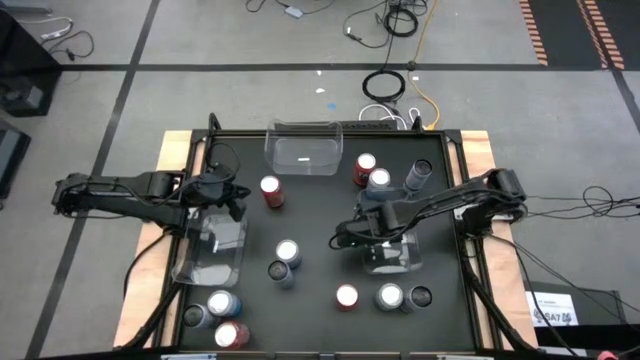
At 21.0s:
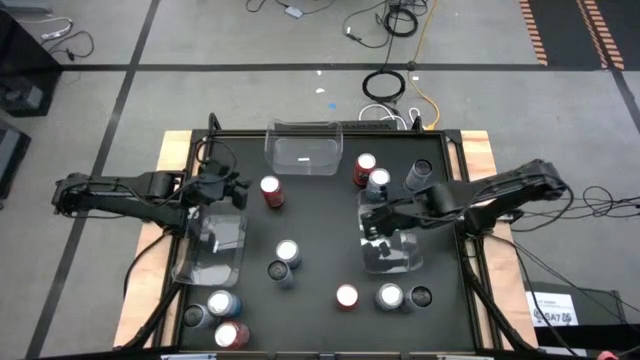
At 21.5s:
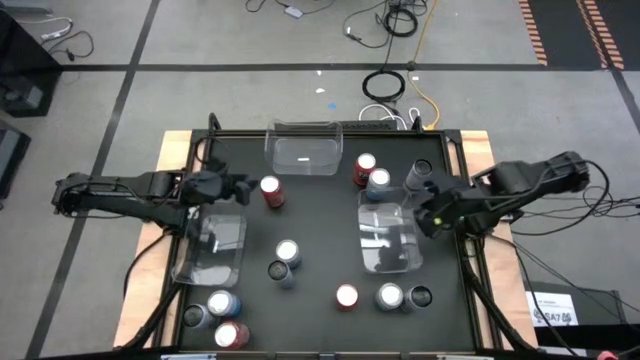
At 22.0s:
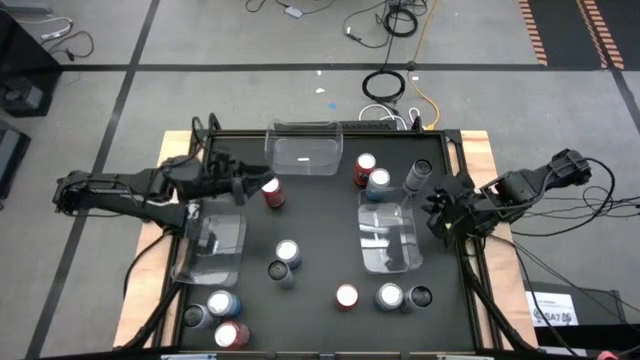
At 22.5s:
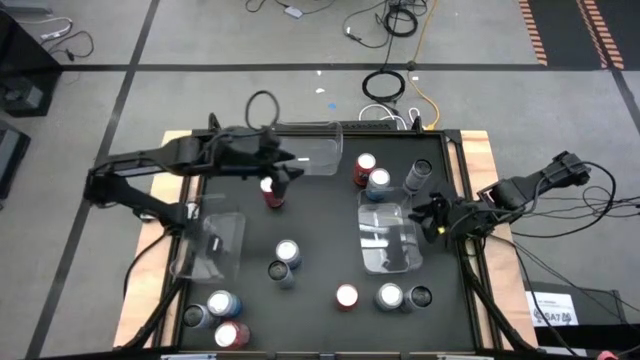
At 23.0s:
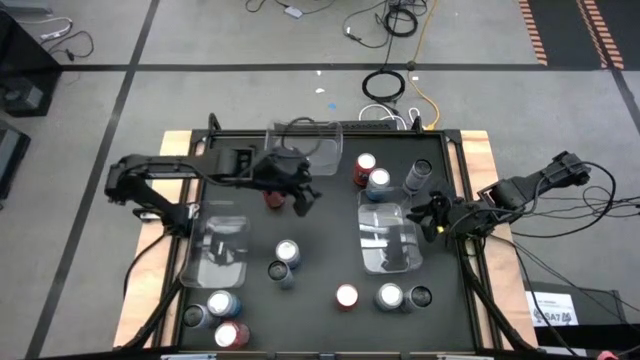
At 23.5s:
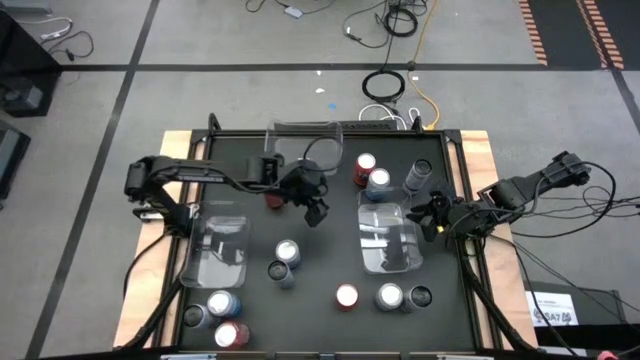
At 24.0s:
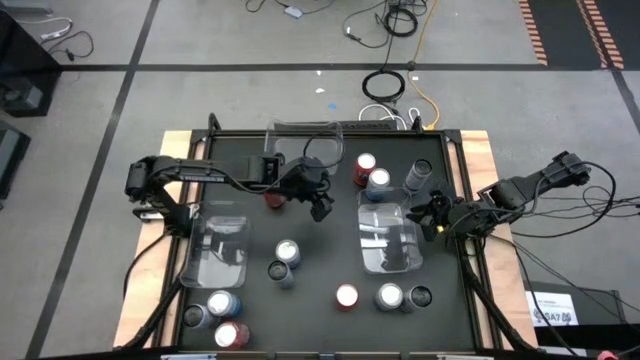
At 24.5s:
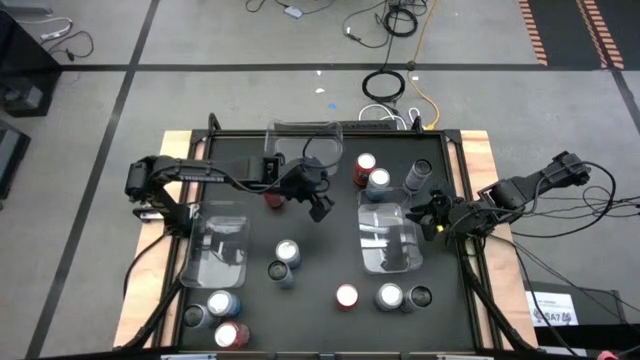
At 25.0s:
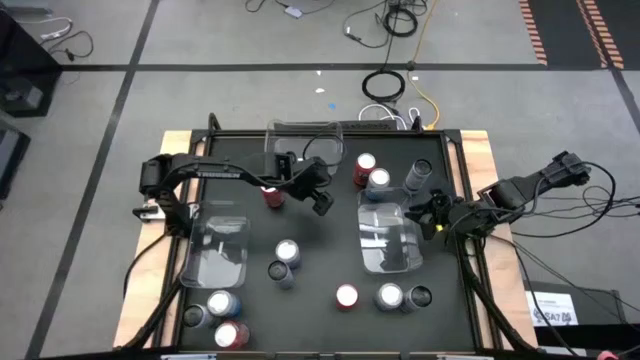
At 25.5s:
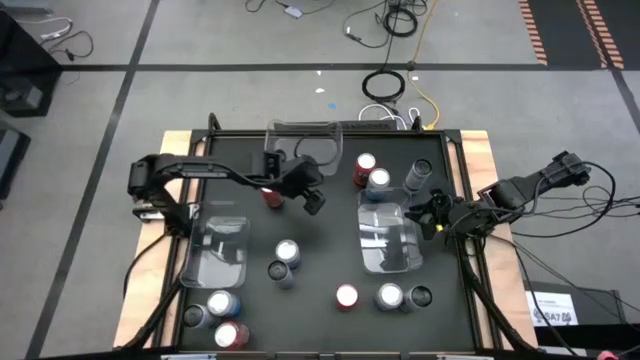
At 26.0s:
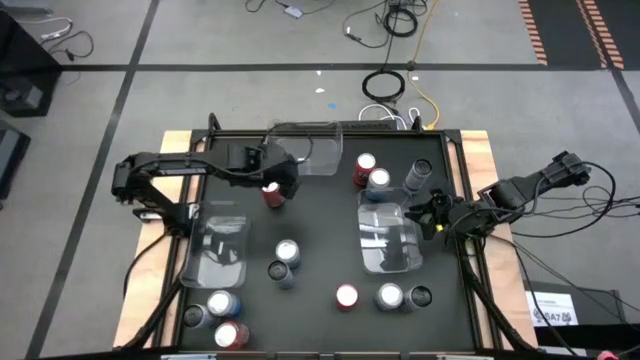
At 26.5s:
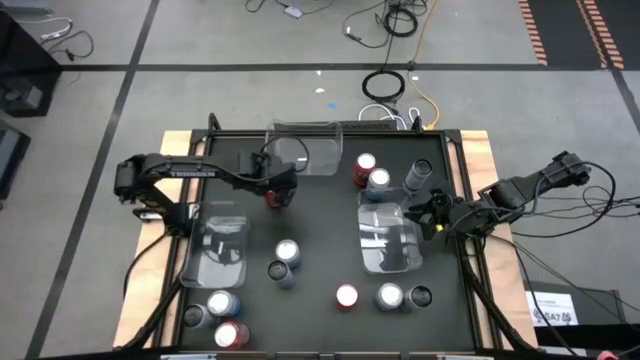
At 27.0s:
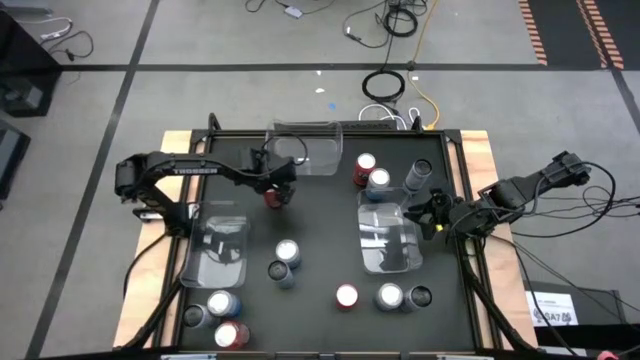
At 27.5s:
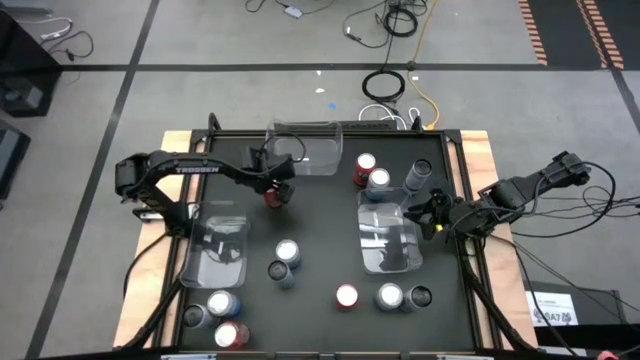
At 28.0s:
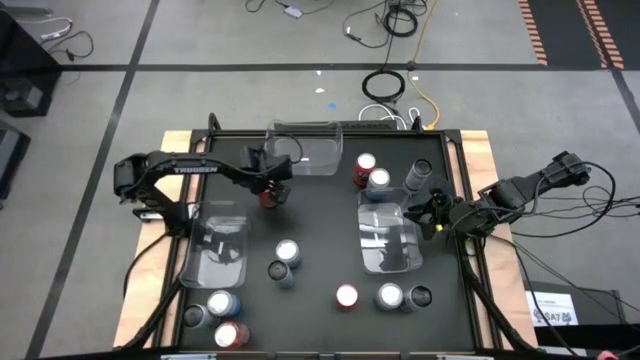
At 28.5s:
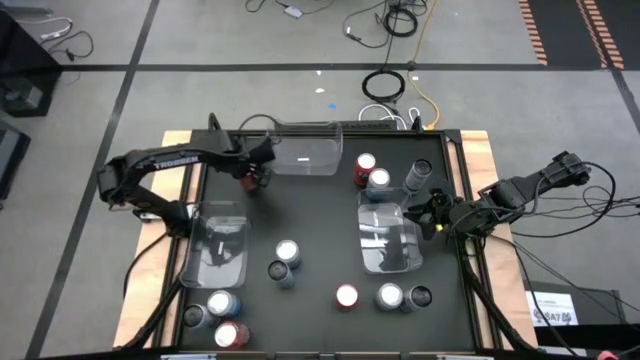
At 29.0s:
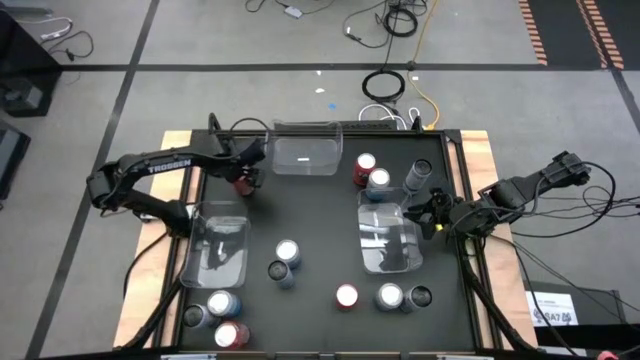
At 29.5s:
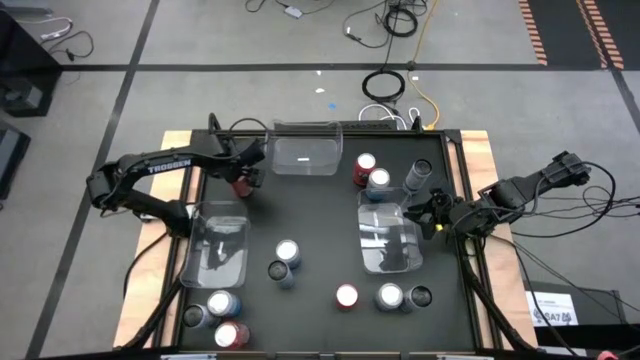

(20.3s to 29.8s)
Task: Sort soda cans
Move the red soda can to the top left of the table

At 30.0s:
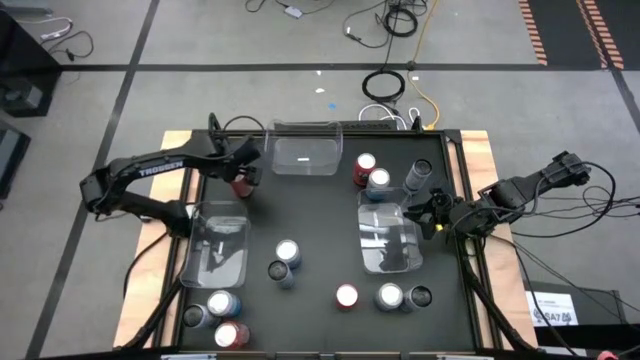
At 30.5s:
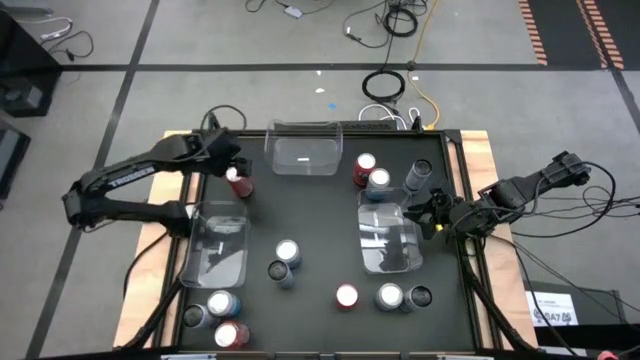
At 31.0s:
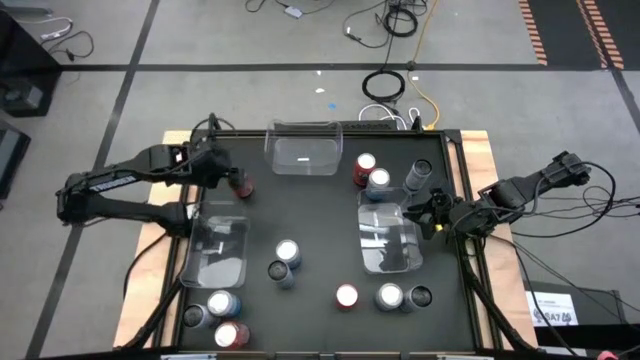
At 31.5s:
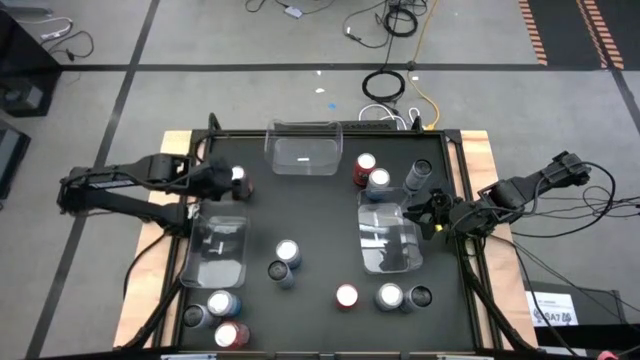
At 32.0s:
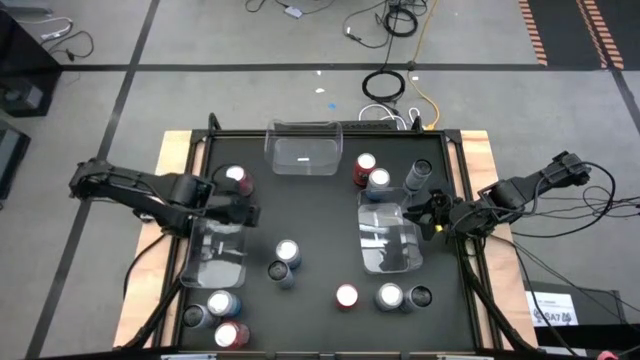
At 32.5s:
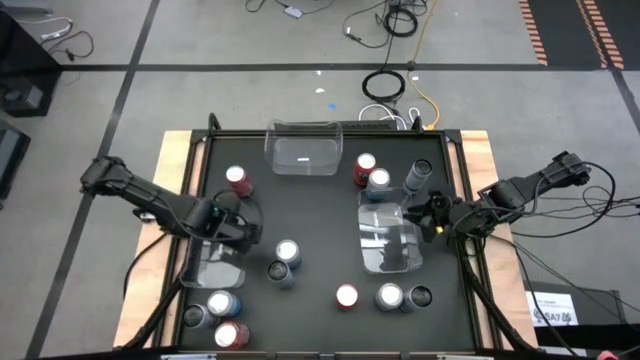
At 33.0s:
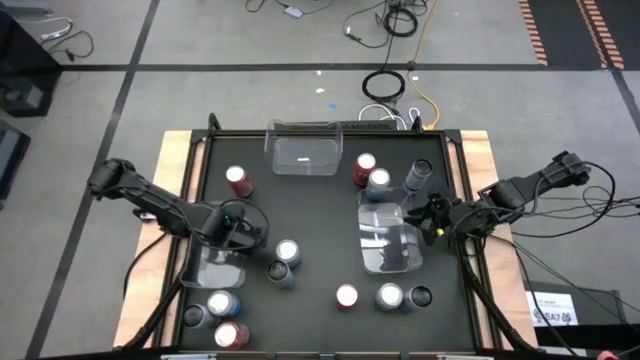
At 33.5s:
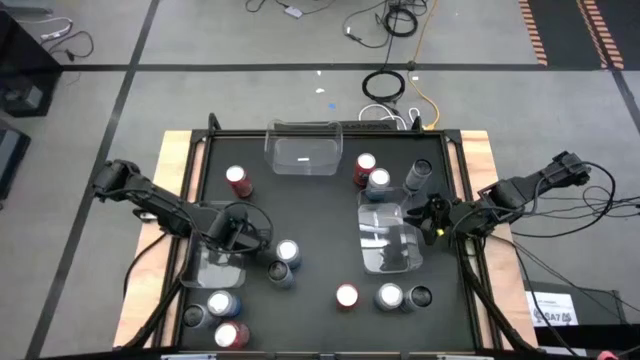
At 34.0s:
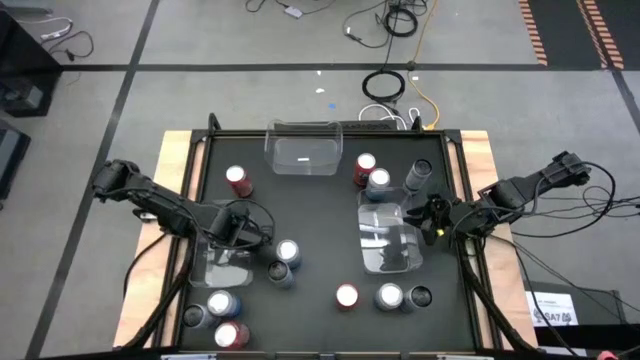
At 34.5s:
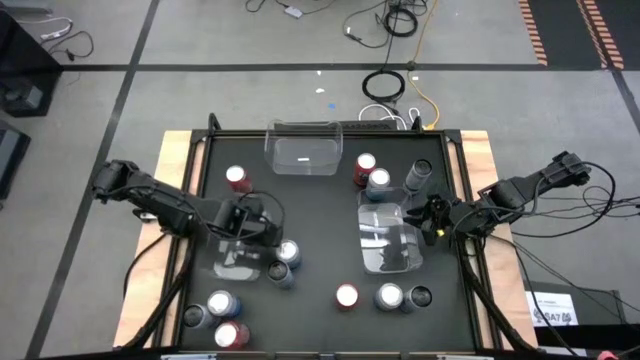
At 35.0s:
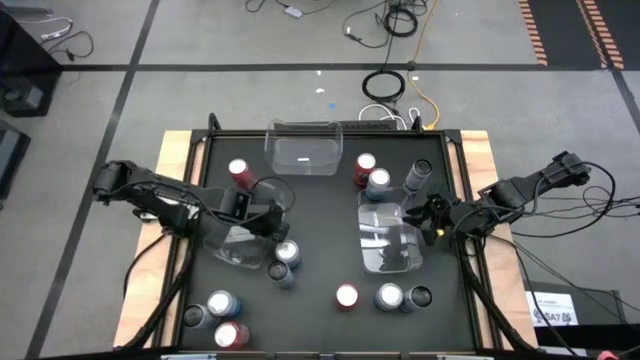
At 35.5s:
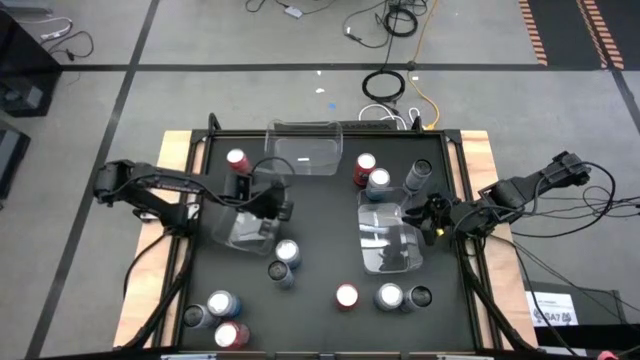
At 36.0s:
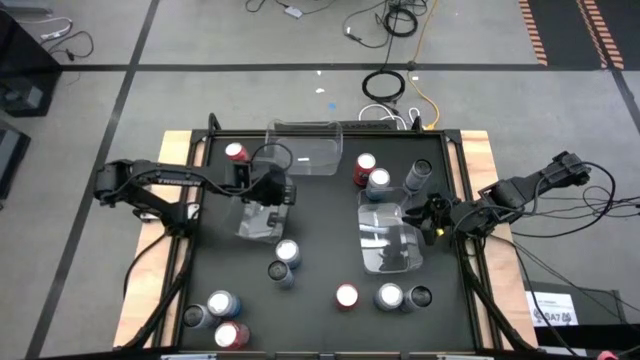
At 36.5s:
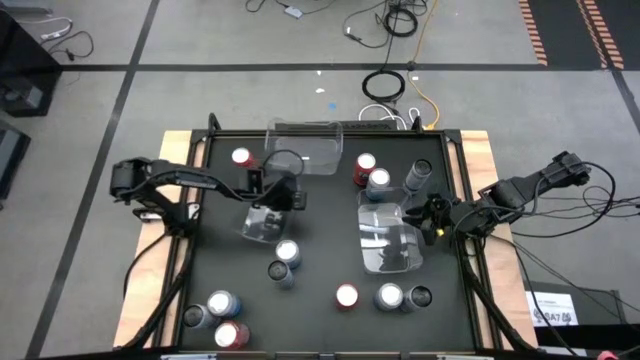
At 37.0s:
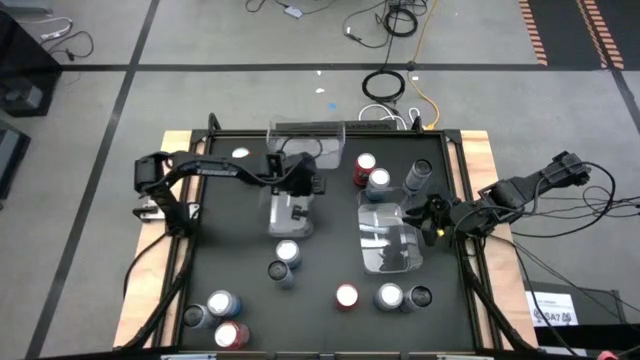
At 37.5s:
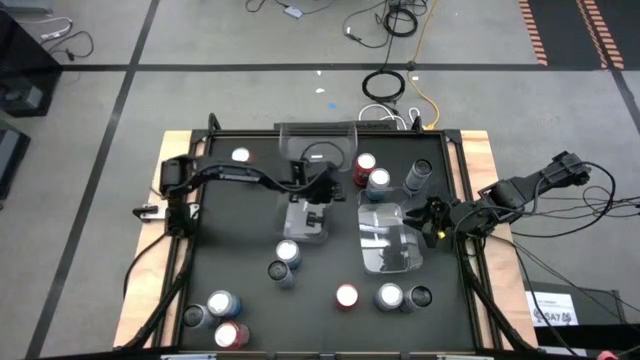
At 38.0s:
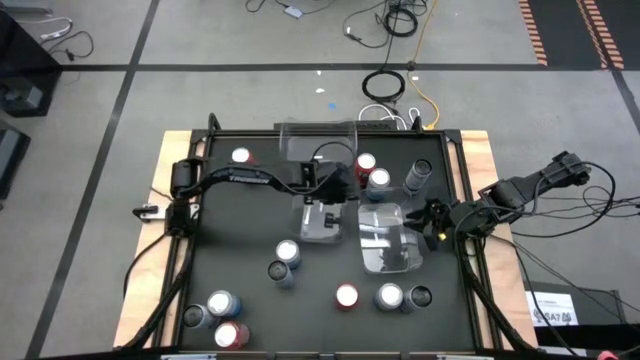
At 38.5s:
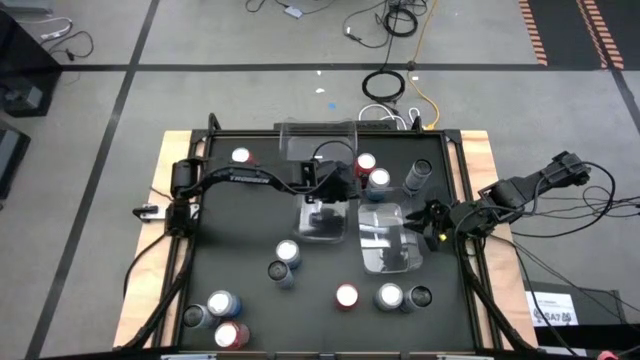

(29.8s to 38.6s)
Move the left transparent bin to the center of the table
